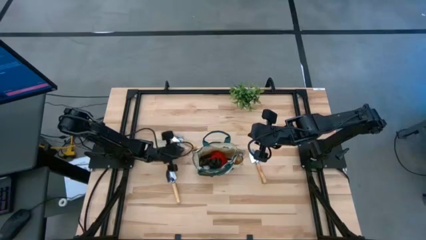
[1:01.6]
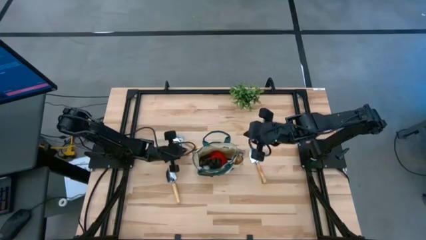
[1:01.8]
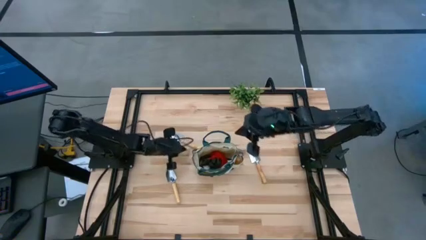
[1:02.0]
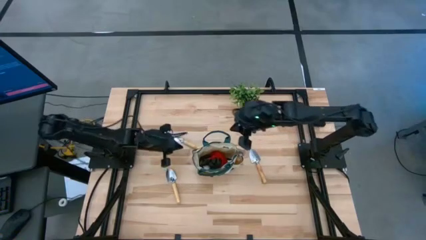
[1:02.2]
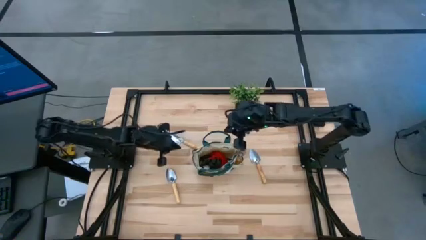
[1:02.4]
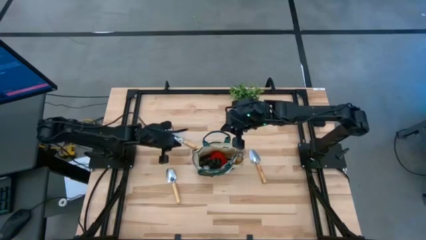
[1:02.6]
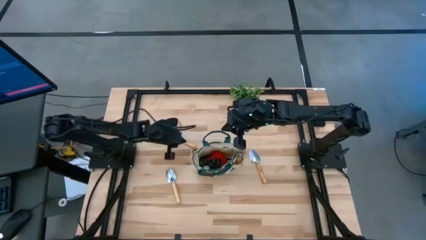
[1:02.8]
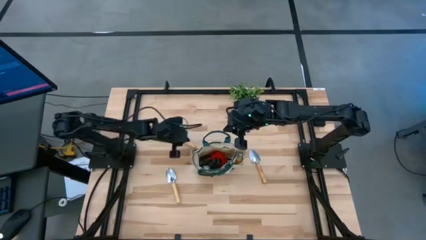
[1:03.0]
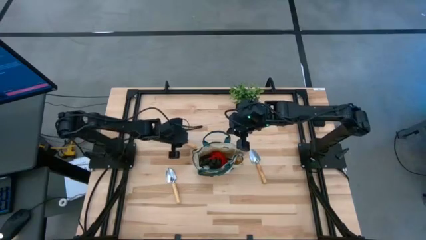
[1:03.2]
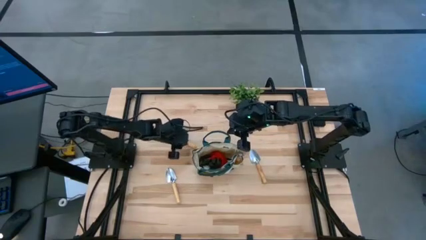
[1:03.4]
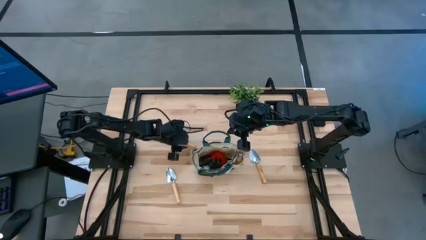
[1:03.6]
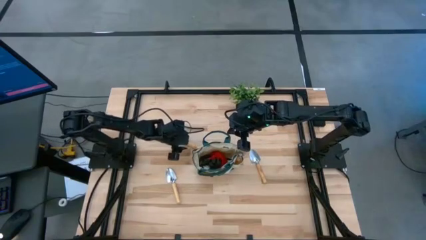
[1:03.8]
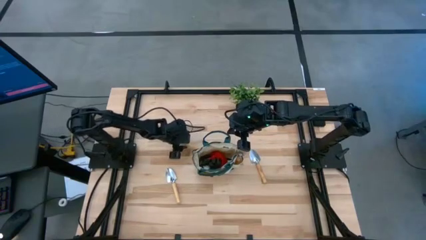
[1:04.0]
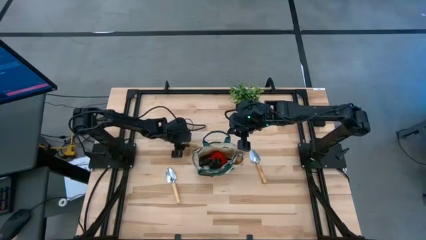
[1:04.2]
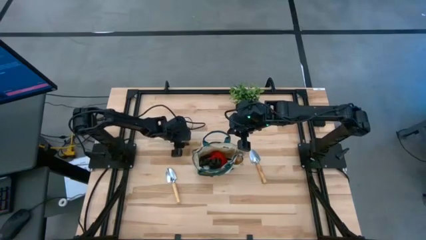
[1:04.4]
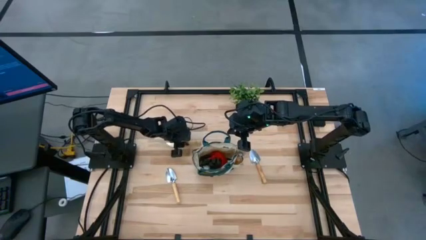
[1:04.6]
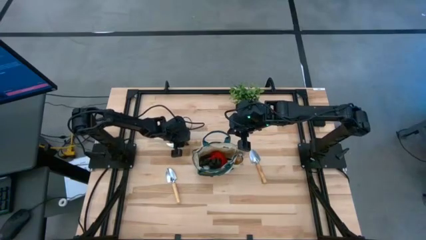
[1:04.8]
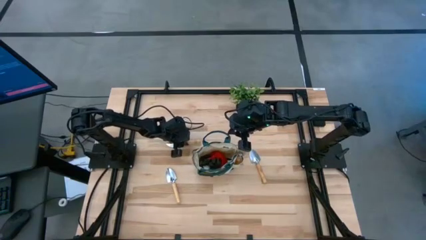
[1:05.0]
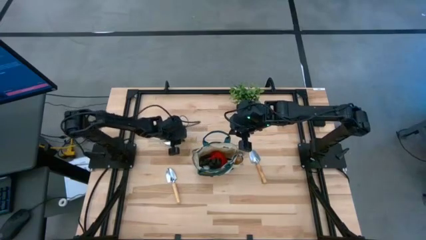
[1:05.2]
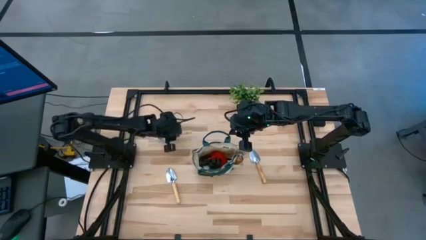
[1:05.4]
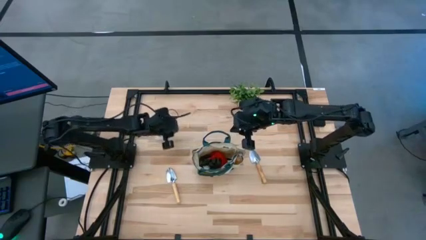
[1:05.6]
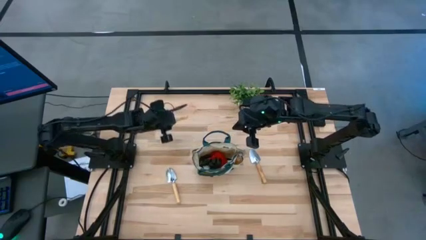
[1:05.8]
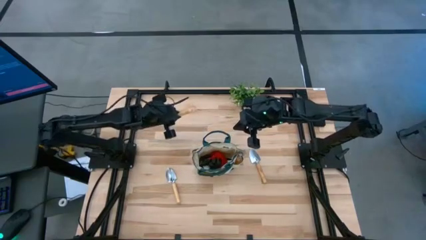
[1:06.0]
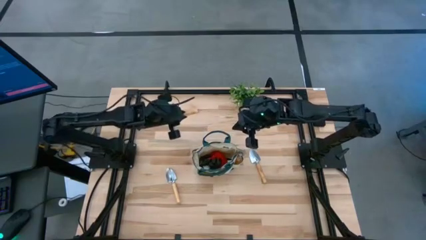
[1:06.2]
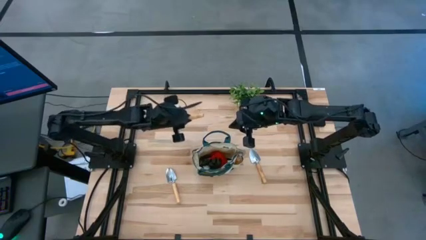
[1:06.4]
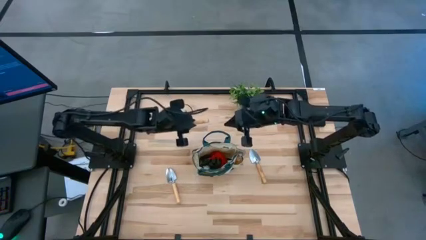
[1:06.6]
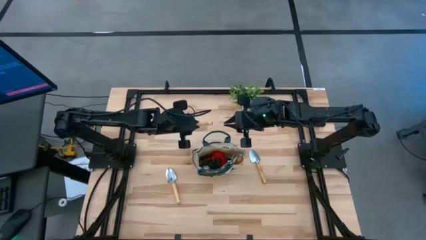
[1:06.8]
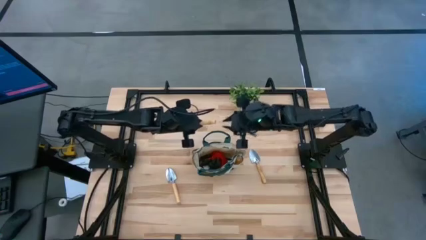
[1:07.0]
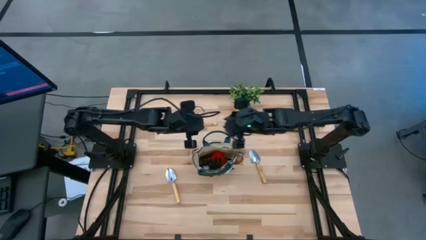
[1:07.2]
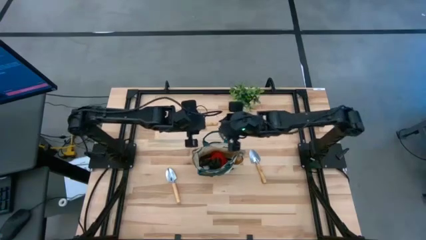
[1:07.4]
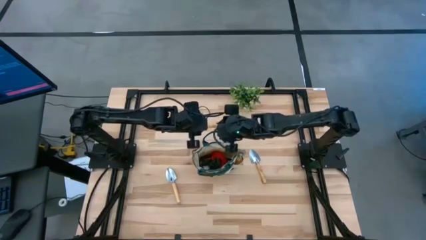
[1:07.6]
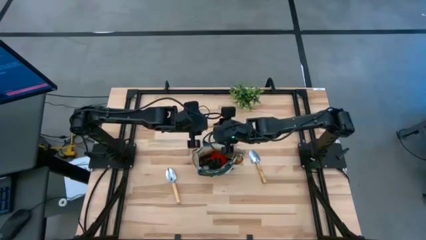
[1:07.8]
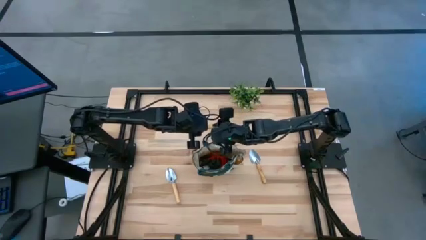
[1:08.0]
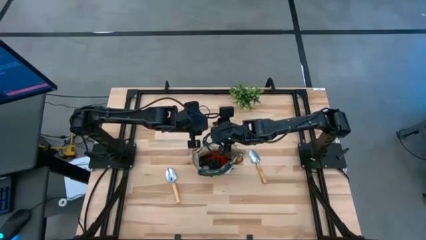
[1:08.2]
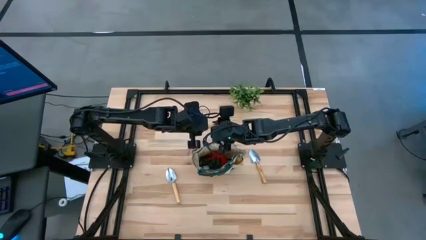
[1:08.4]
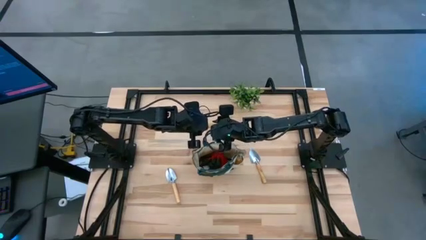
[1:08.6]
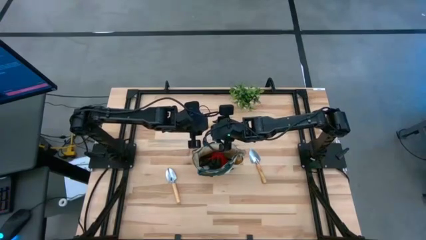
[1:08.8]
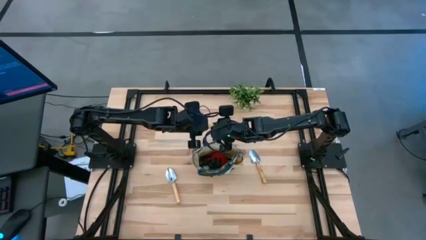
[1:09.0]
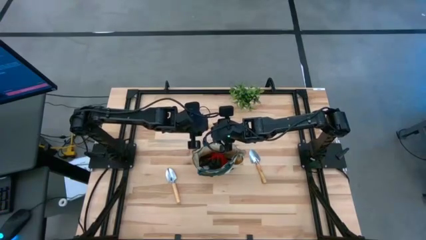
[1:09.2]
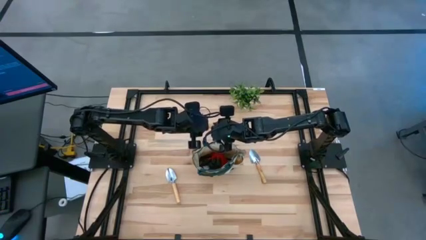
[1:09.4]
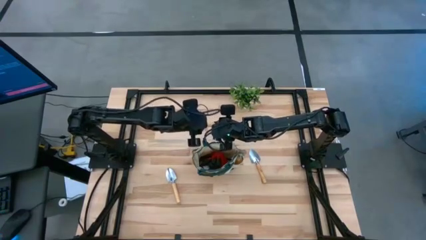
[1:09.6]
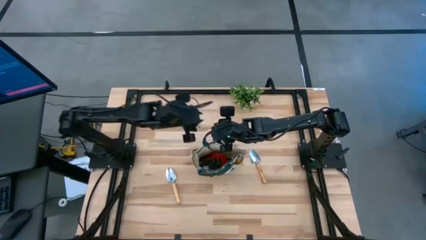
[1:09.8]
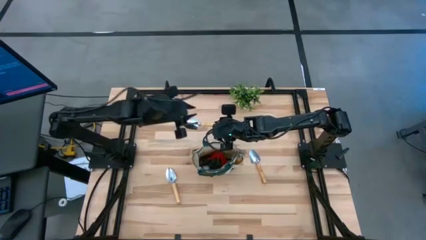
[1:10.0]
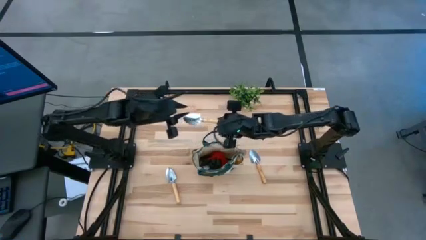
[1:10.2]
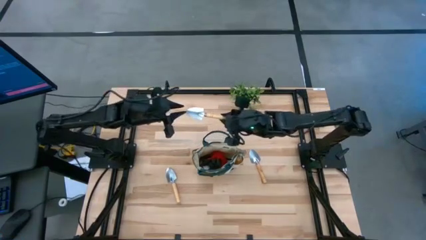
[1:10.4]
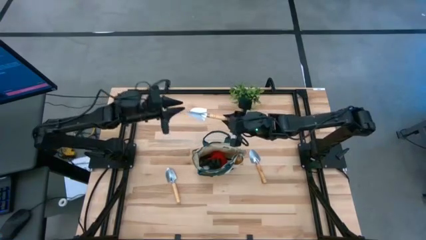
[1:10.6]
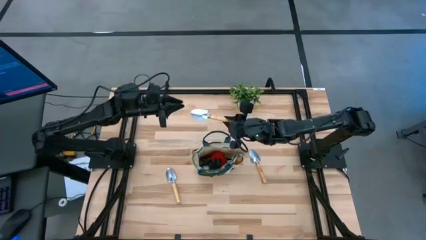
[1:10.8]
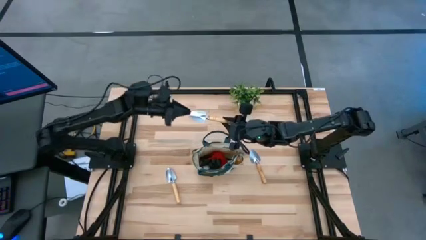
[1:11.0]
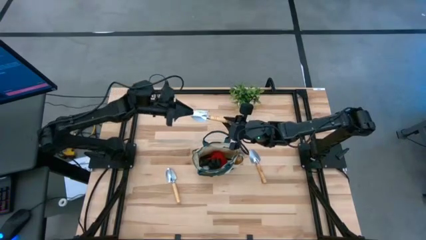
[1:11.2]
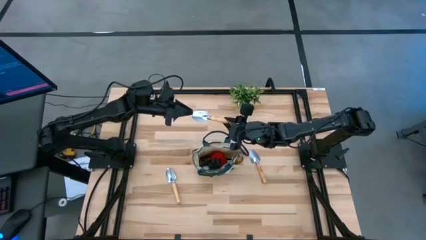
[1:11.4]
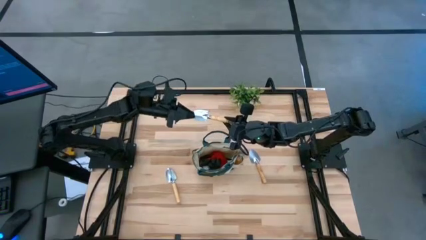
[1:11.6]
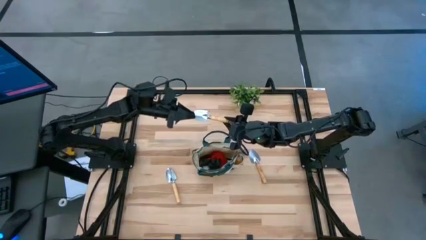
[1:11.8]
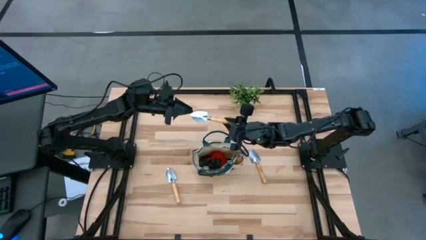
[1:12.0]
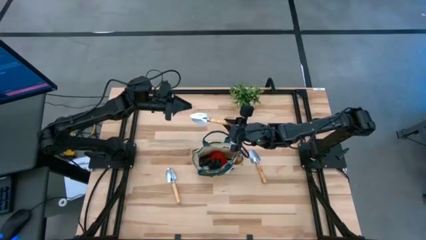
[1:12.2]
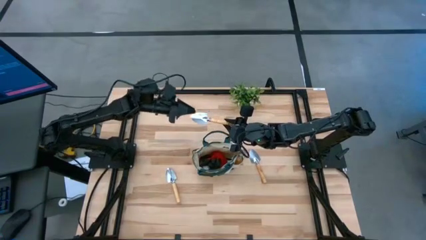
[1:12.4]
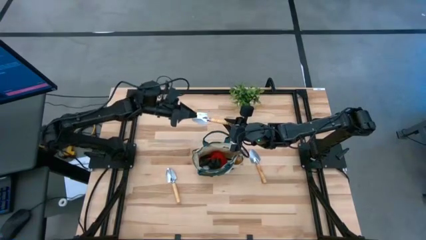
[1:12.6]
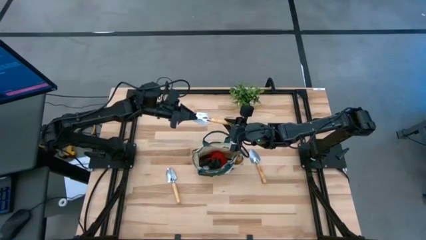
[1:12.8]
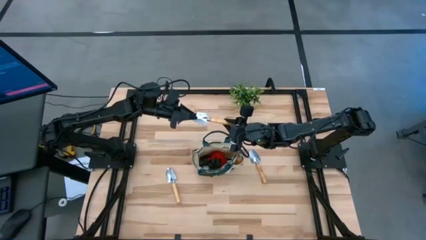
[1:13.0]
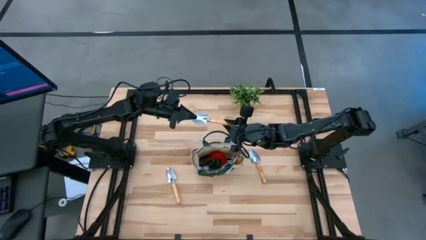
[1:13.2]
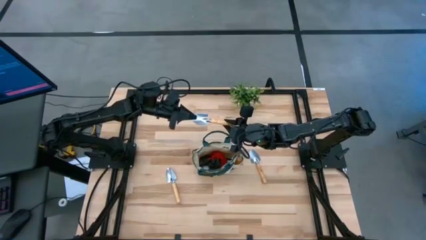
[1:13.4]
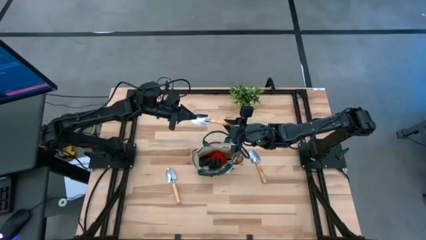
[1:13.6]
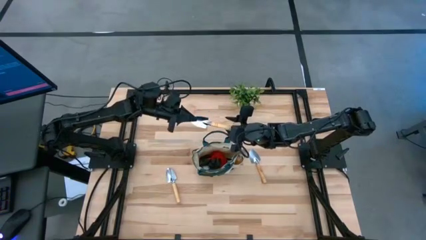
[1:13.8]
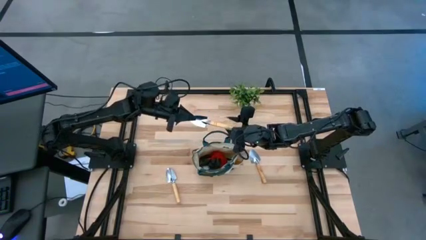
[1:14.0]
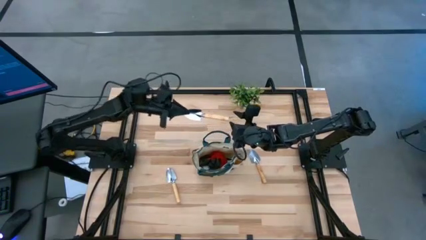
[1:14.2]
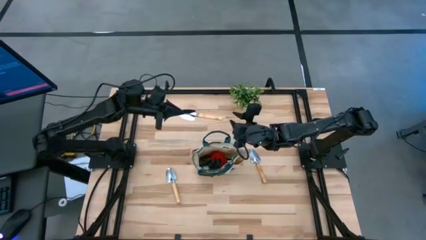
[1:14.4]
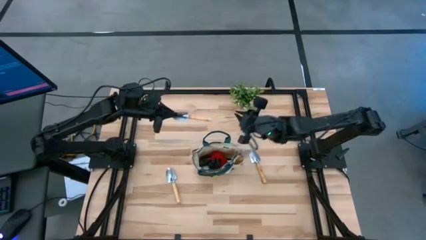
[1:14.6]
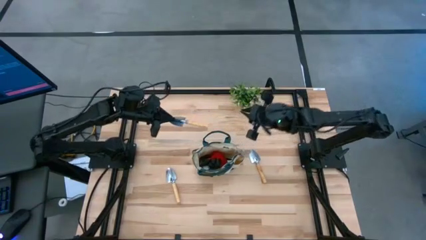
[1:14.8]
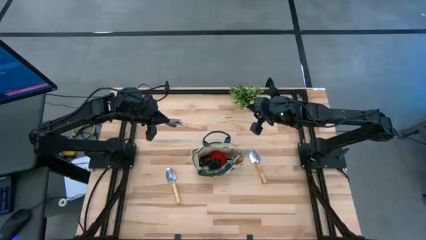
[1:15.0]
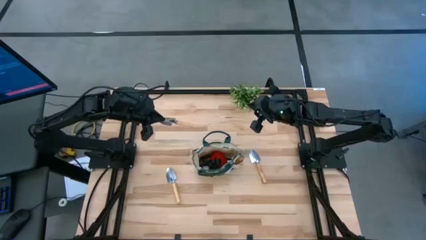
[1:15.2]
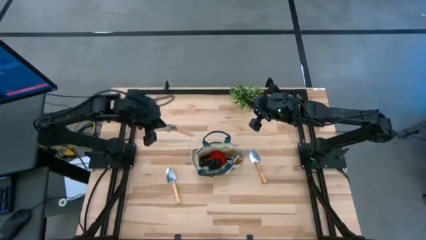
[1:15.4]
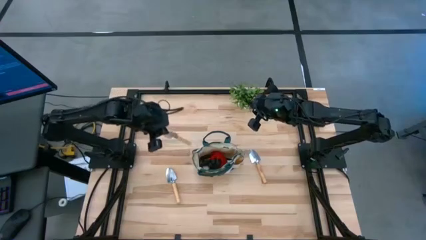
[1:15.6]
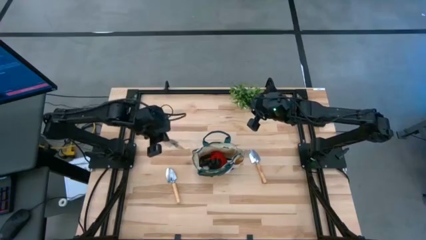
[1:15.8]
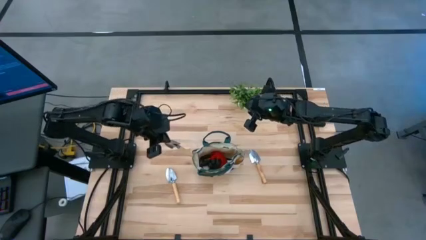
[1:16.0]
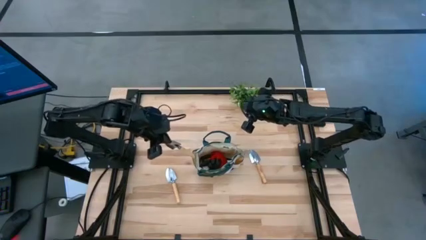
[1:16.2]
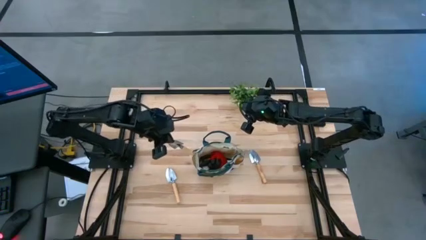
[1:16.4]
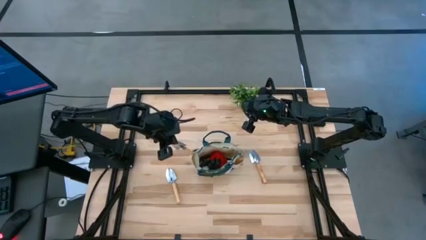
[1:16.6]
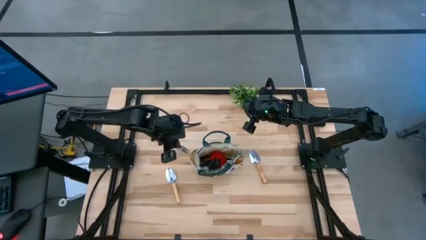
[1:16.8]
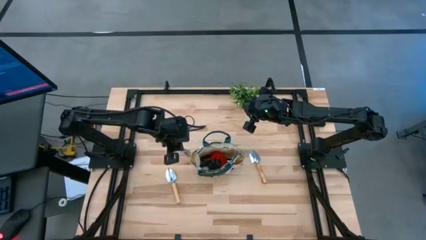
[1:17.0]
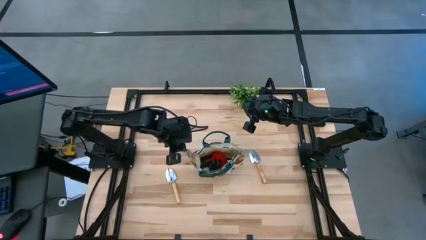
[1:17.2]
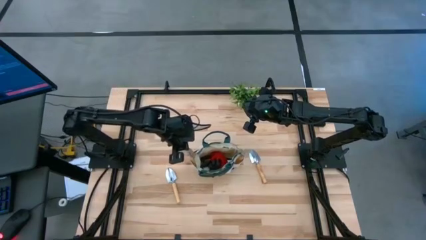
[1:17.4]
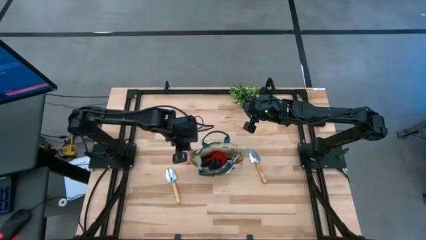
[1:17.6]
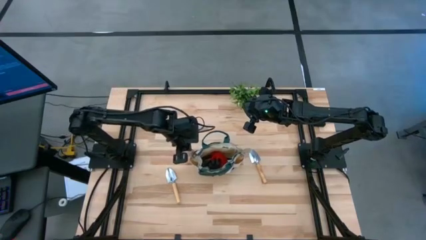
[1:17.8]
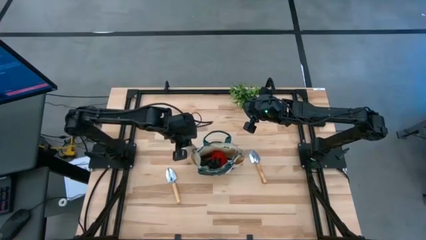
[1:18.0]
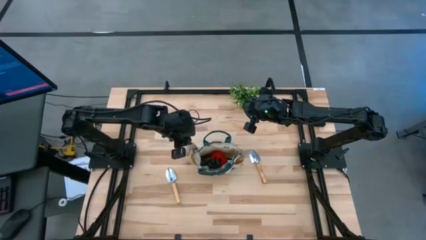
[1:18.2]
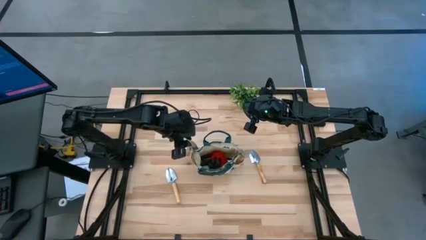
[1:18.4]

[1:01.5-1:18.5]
Task: Pick & Place Garden tools in Gardening bag
Put the brown trowel into the gardening bag
